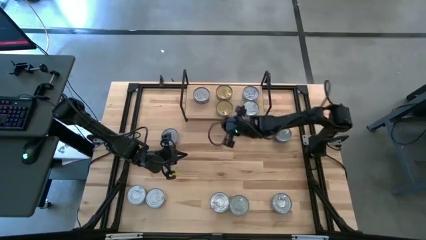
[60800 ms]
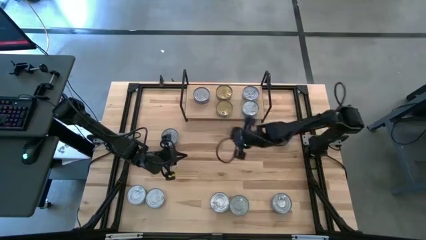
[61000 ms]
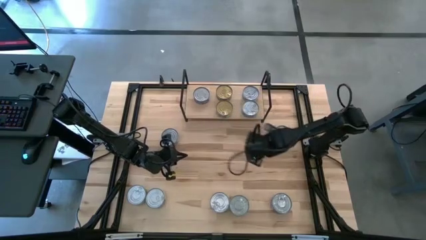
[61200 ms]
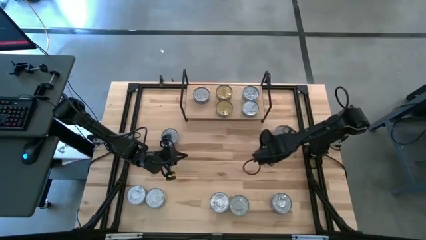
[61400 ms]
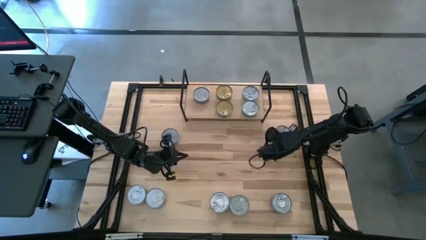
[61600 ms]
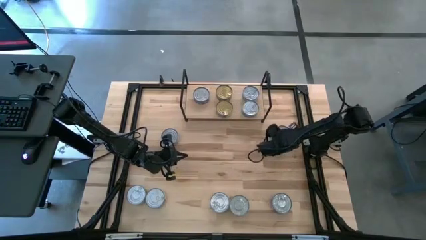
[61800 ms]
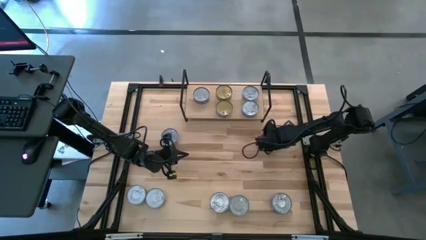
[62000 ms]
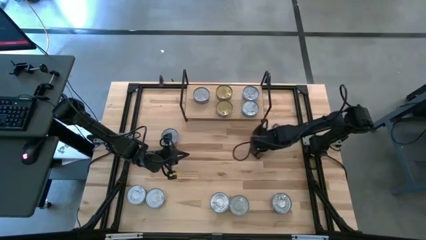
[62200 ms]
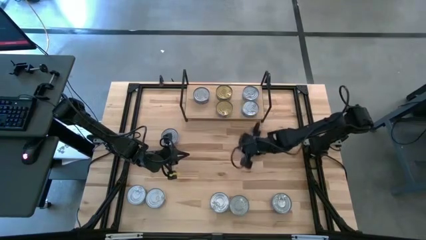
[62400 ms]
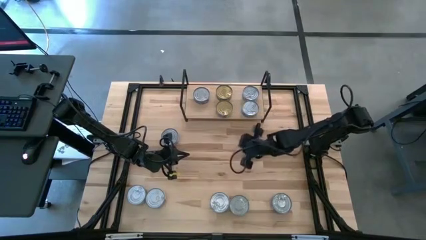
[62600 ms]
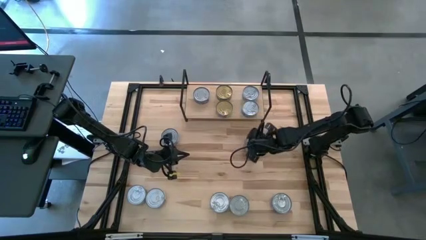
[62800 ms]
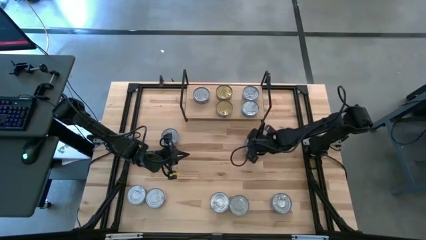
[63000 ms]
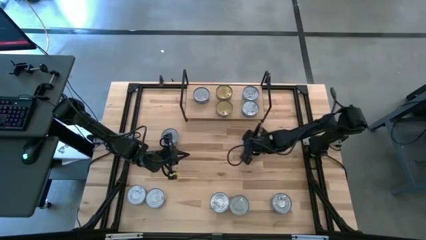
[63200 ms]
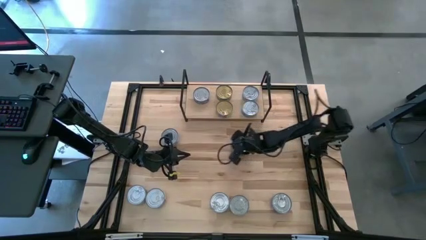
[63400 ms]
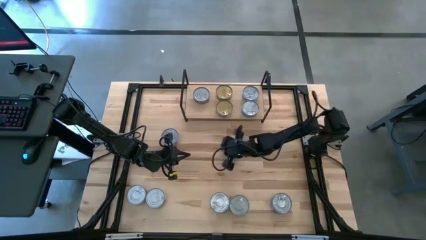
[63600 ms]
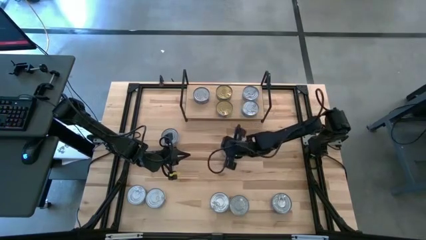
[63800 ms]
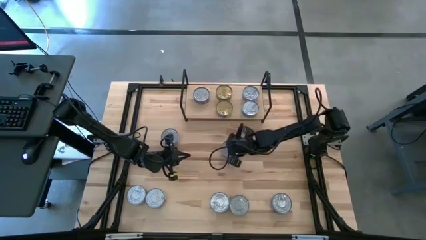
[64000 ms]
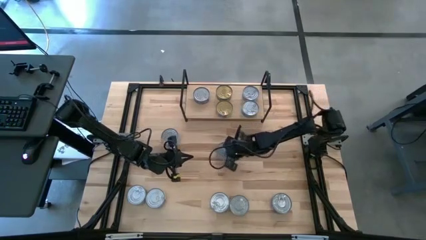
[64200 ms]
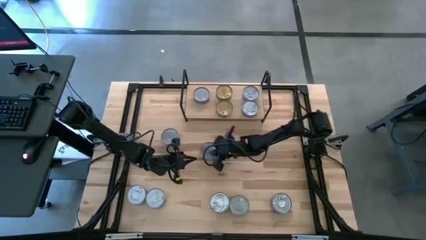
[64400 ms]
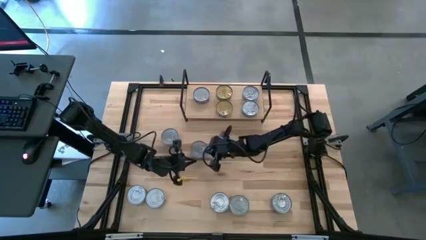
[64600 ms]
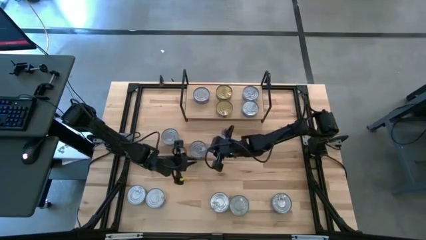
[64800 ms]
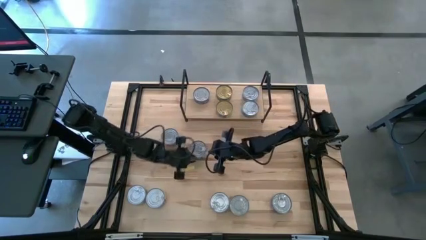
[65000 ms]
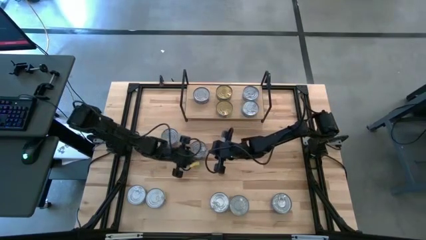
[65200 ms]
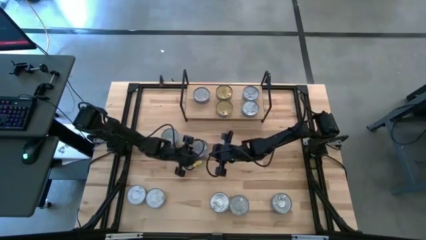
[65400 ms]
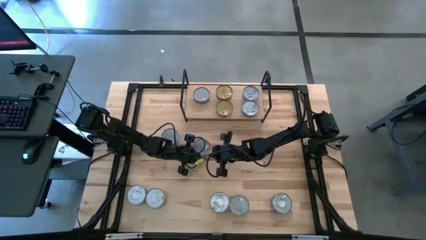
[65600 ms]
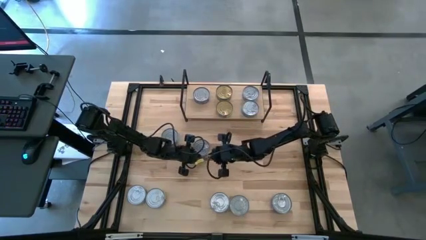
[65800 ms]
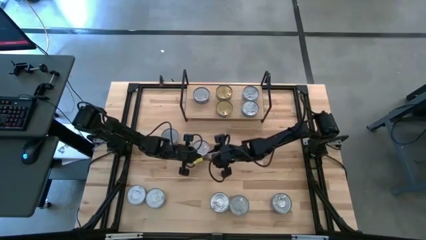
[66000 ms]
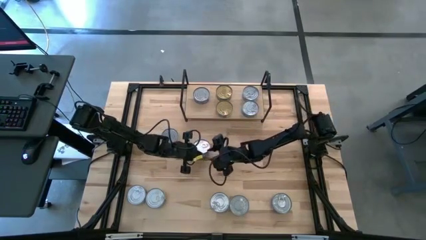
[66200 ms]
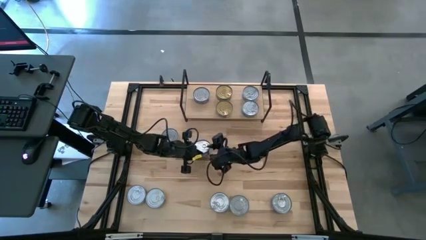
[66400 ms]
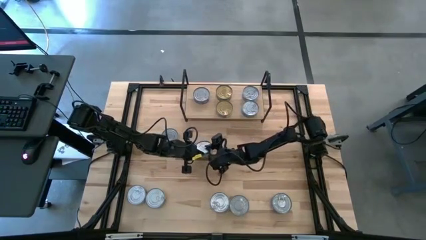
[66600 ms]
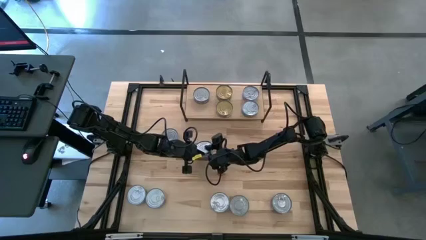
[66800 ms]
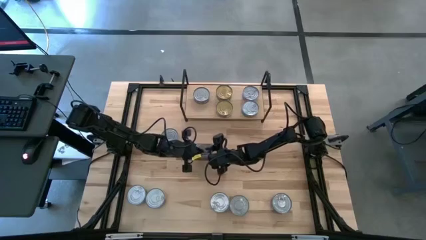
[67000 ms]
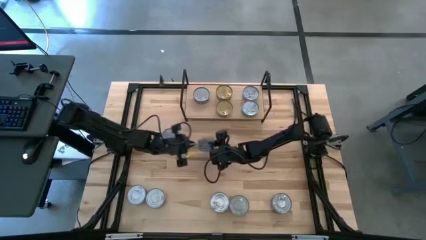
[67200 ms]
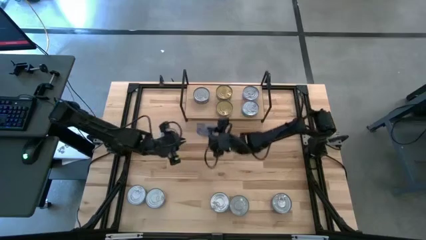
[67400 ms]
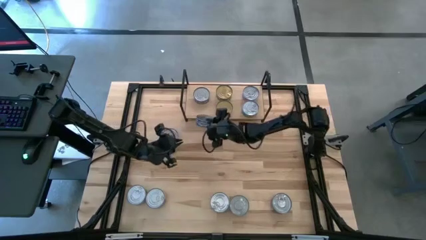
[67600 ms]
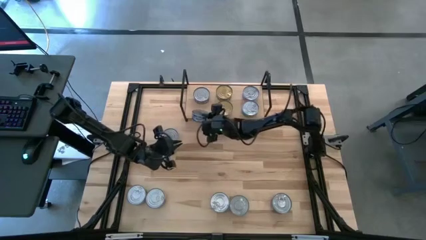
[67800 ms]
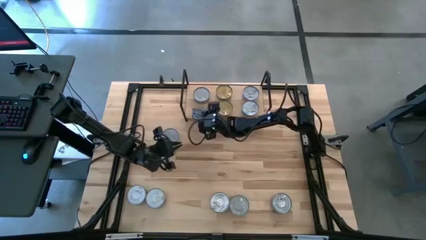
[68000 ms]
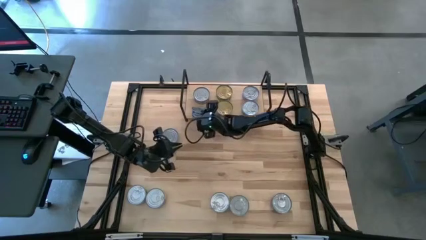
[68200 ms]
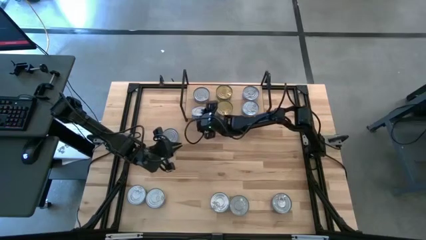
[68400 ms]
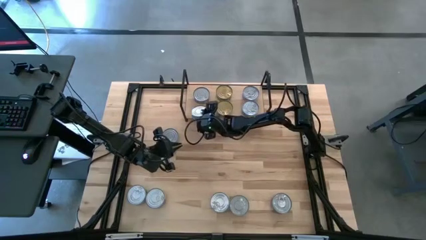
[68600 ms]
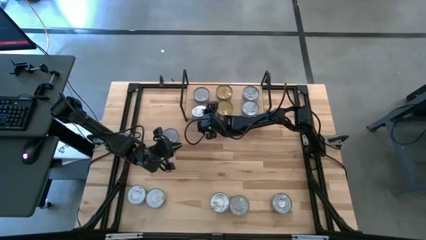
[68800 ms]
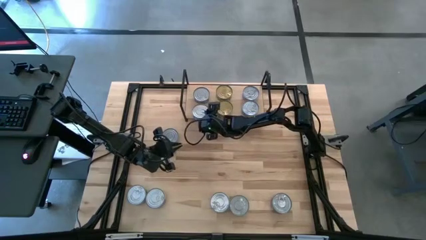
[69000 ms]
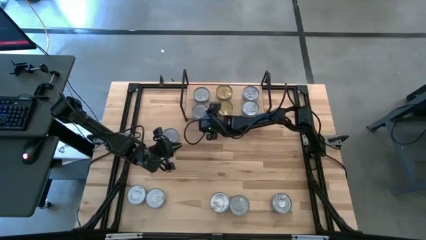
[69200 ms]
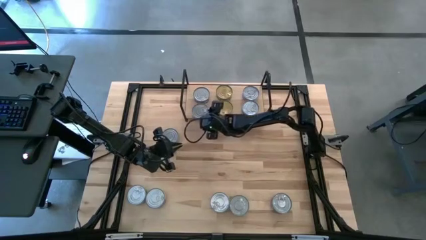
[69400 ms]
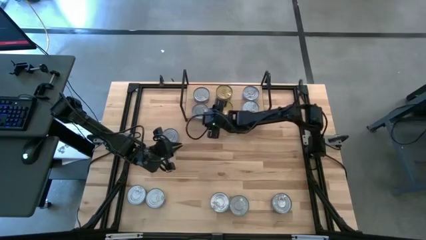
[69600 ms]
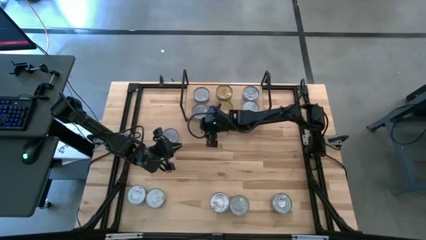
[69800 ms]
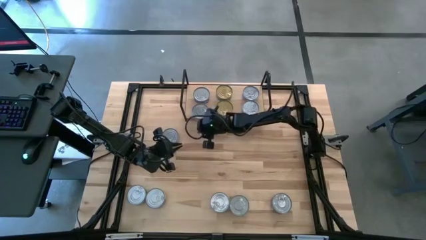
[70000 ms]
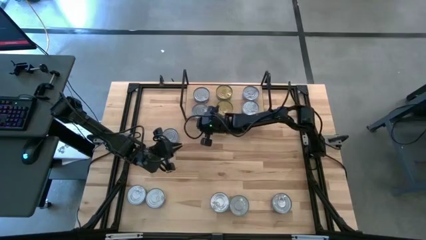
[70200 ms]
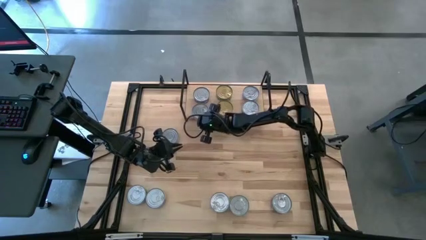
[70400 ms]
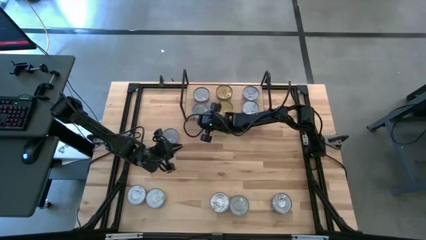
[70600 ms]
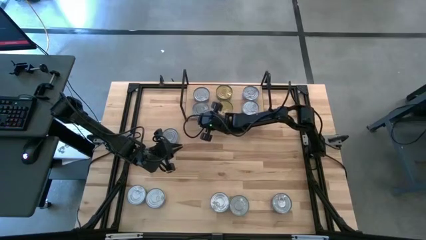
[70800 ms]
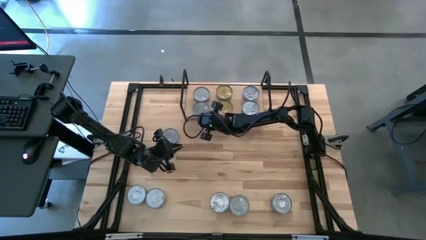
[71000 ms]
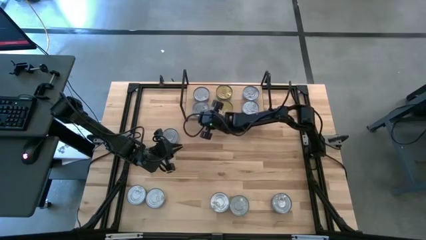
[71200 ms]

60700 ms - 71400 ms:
Task: Stack canned seafood by type on shelf
Put the top blue tuna can on the shelf aligned with the other blue tuna can

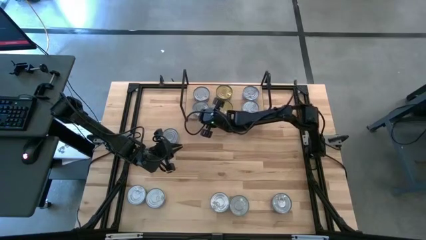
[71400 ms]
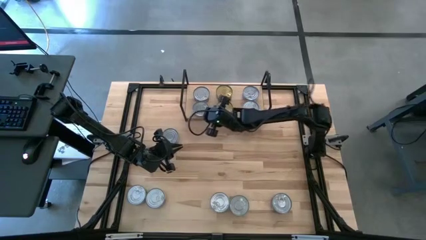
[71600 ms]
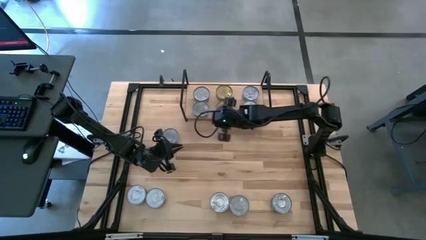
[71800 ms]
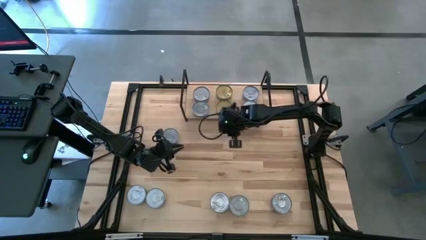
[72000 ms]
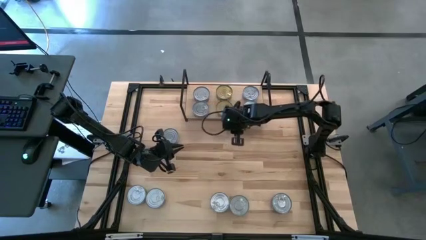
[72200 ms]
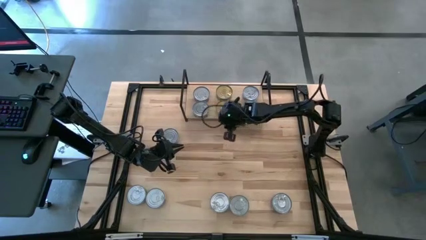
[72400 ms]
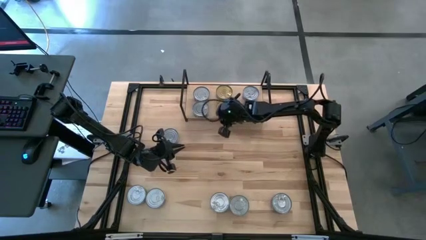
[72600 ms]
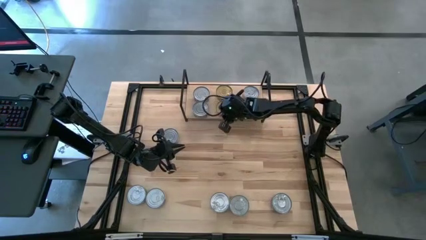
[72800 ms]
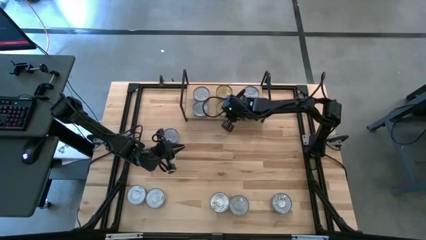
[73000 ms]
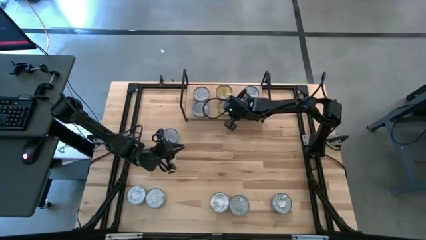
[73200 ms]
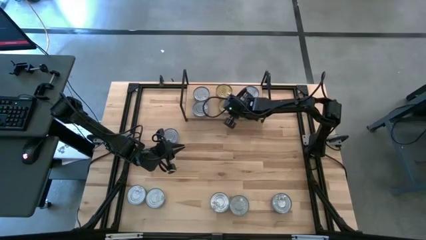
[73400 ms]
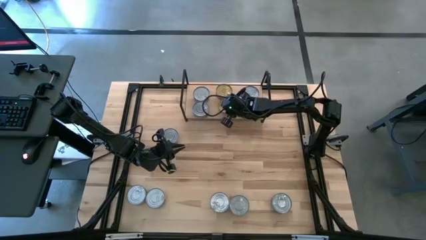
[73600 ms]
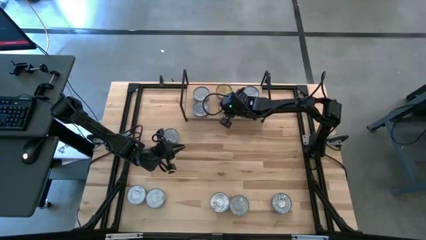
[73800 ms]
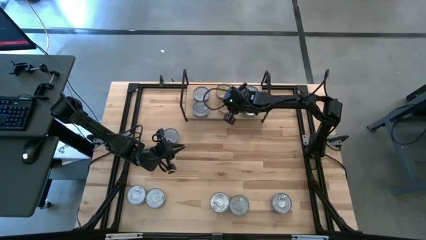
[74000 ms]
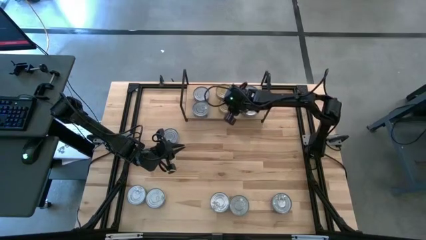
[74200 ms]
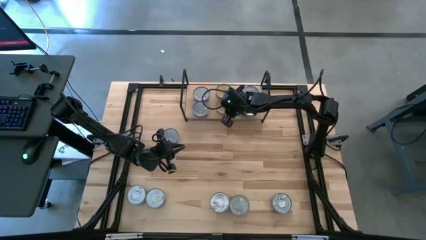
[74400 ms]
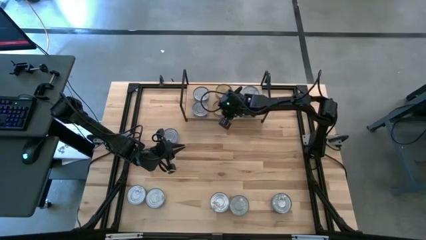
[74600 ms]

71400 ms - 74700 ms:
Adjust the bottom green tuna can on the shelf

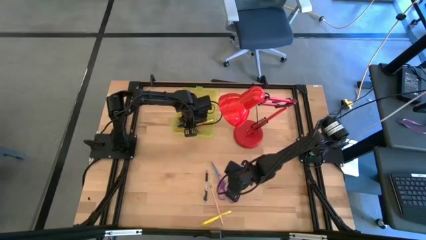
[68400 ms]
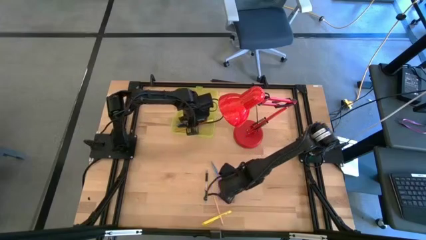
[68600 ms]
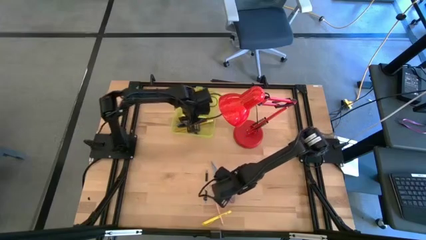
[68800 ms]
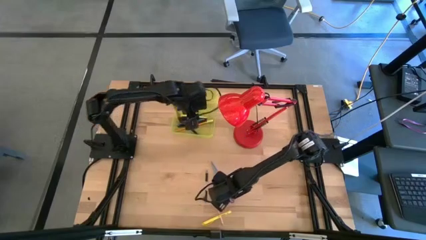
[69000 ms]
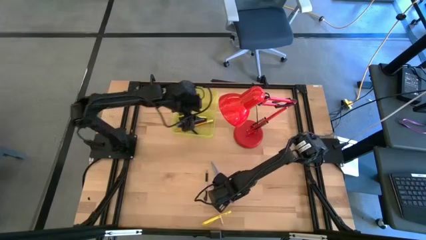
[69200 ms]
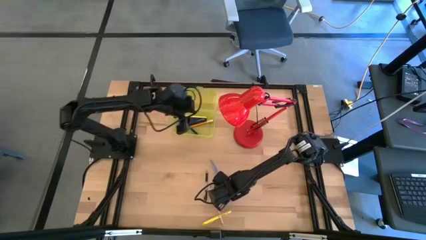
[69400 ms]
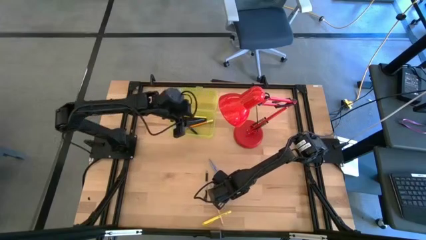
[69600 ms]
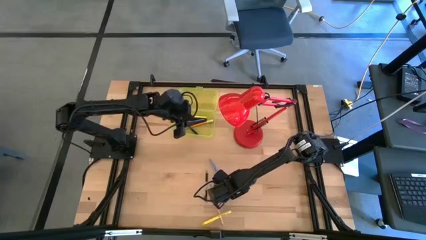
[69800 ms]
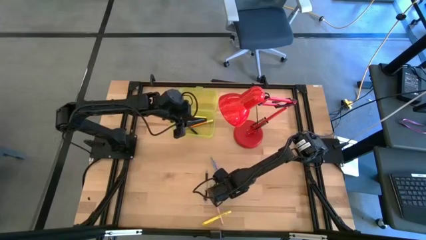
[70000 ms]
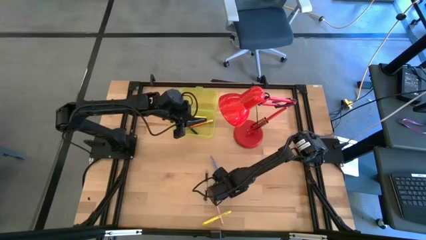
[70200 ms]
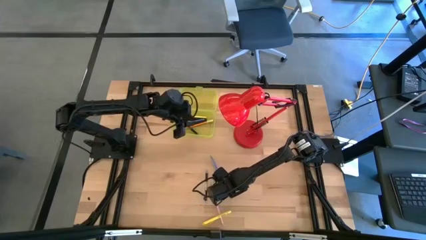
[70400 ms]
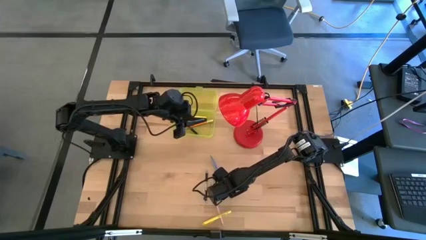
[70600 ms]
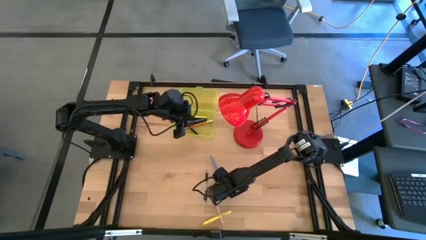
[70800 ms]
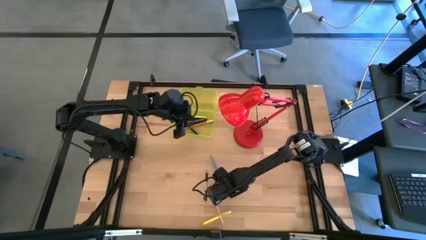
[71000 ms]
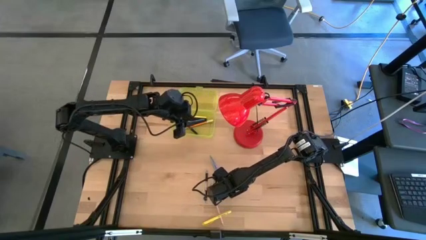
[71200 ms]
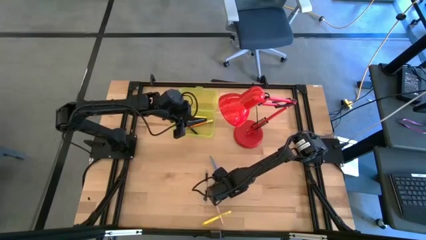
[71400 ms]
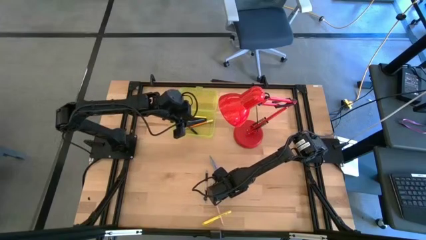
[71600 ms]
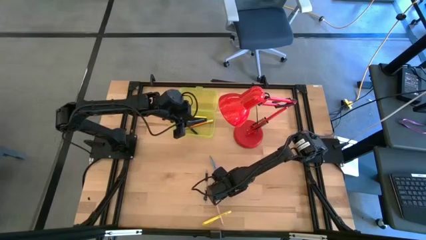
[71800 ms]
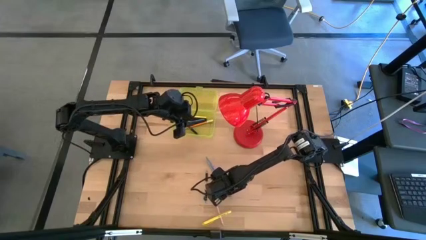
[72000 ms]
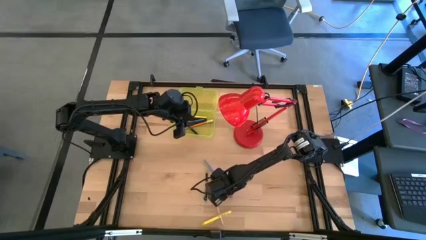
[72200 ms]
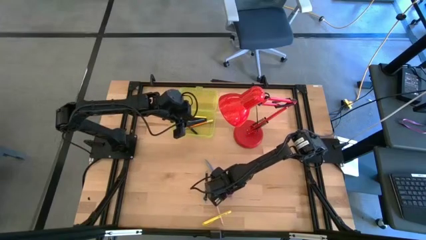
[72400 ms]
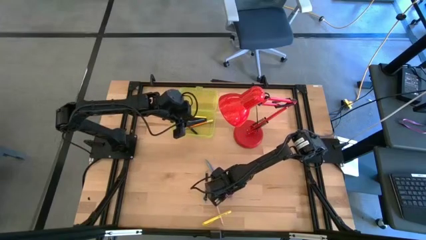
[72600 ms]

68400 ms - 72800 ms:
Task: Pick & place school supplies into a supply box
Put the purple scissors into the yellow supply box
